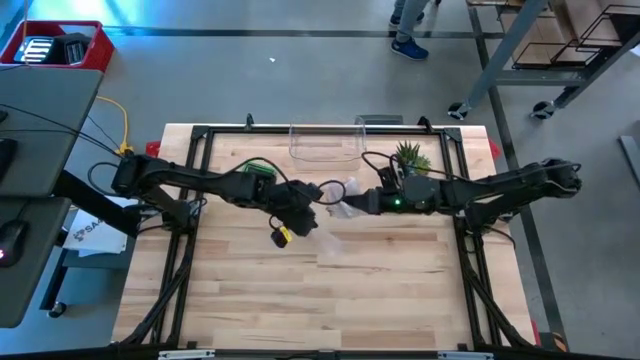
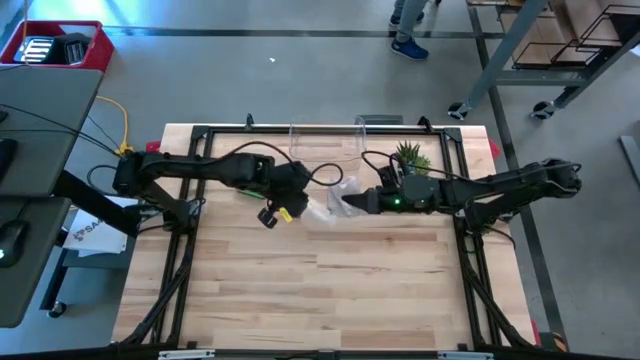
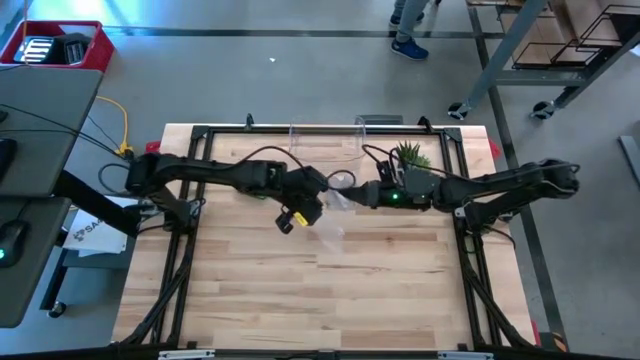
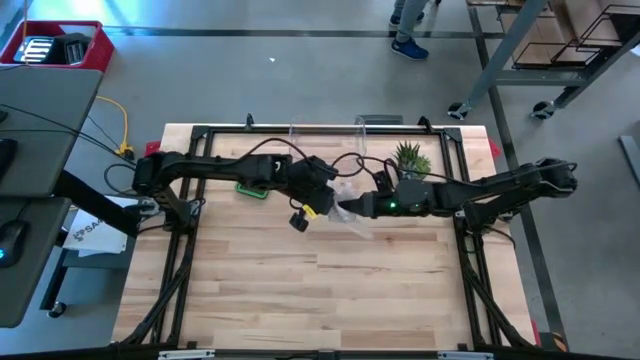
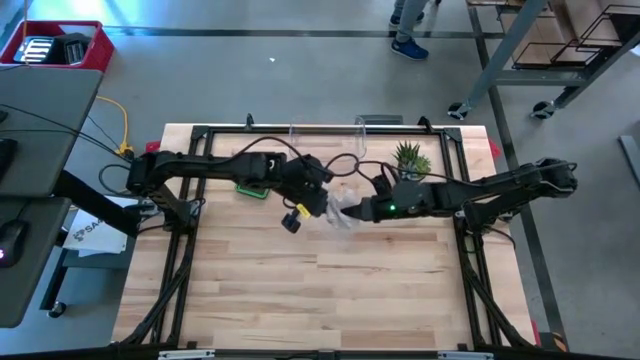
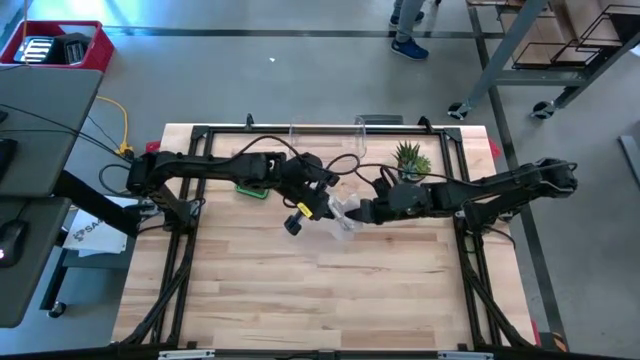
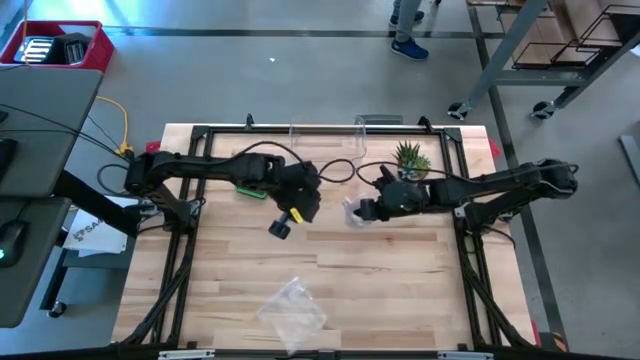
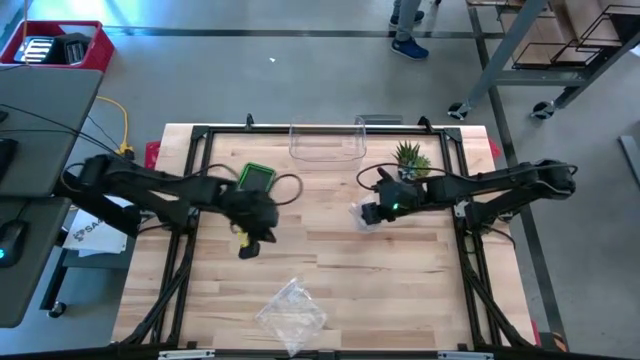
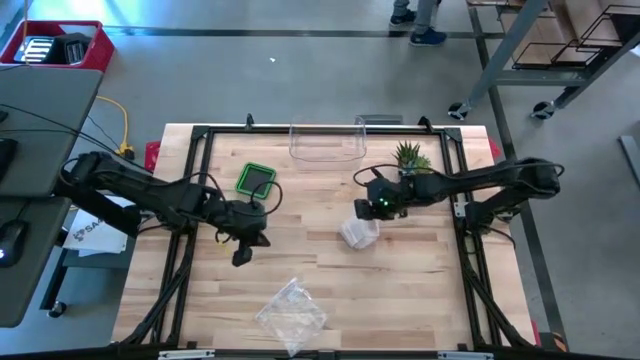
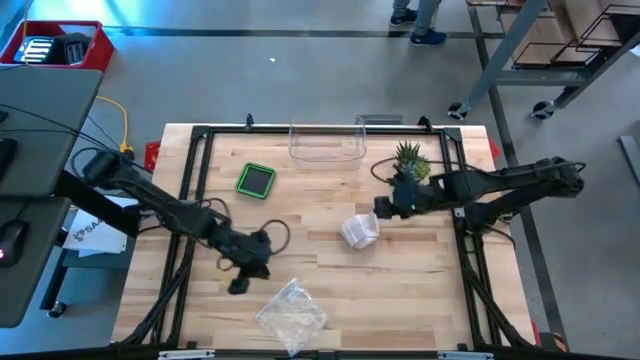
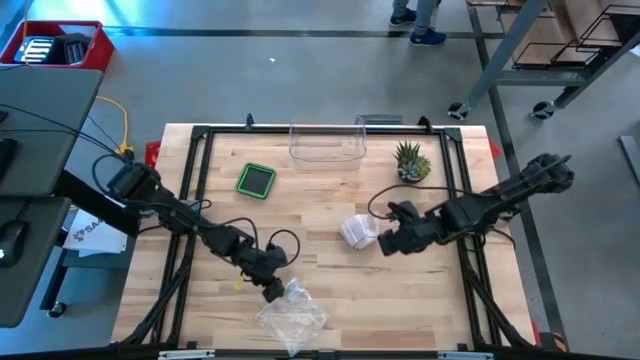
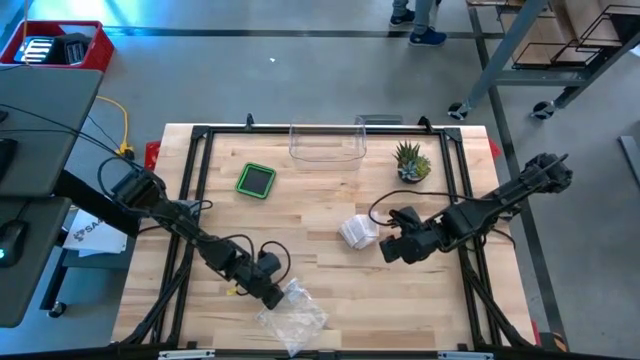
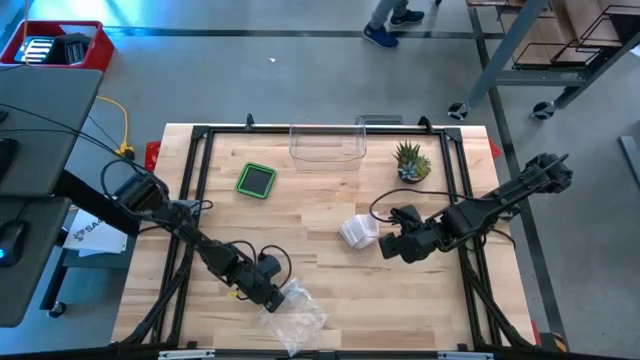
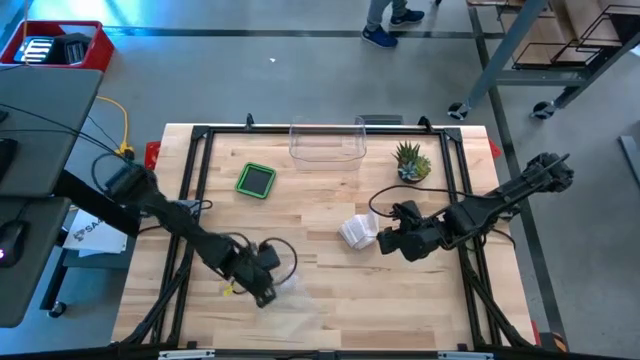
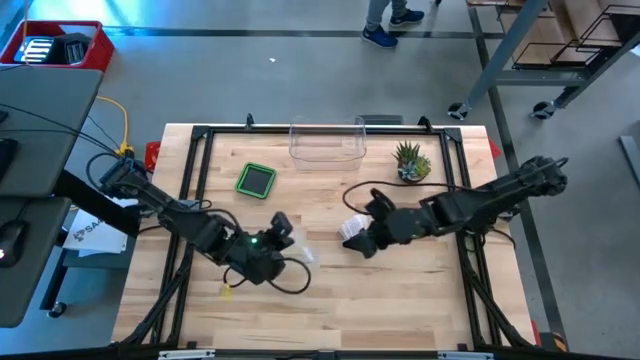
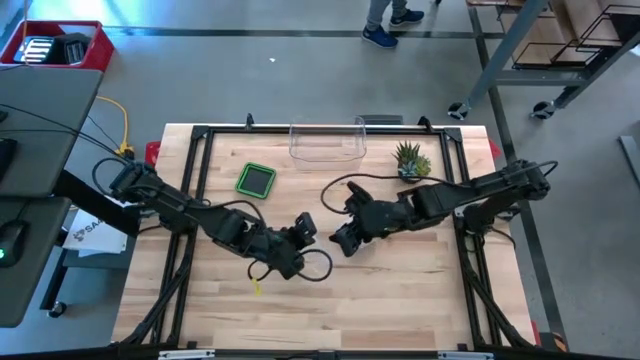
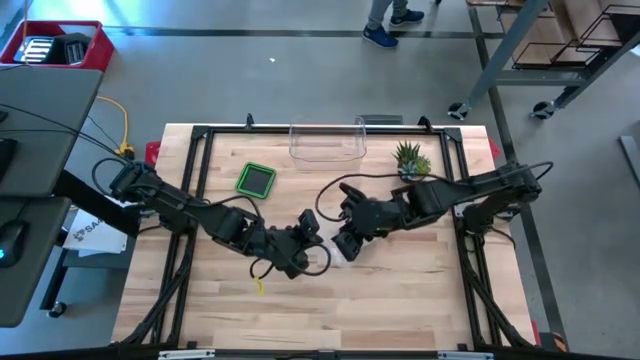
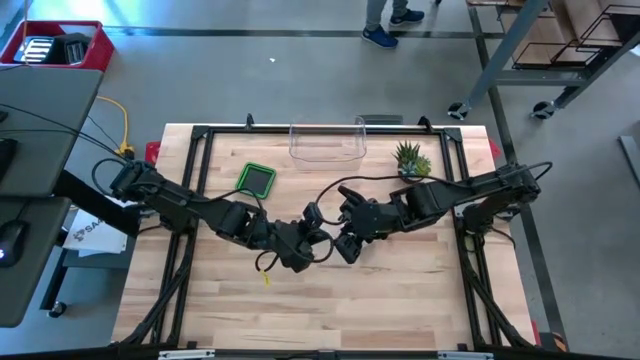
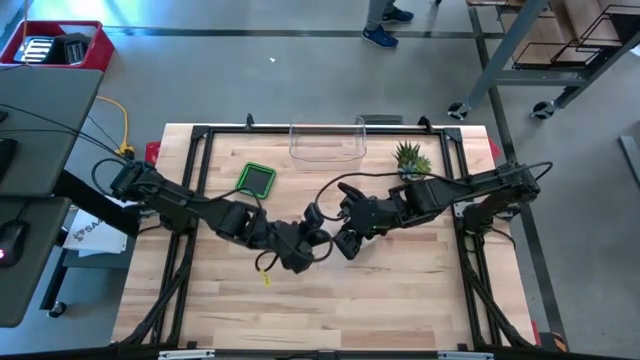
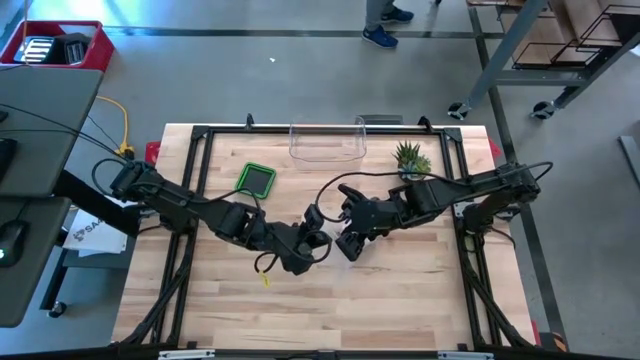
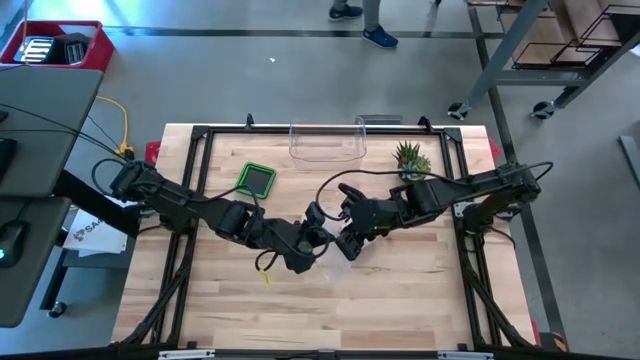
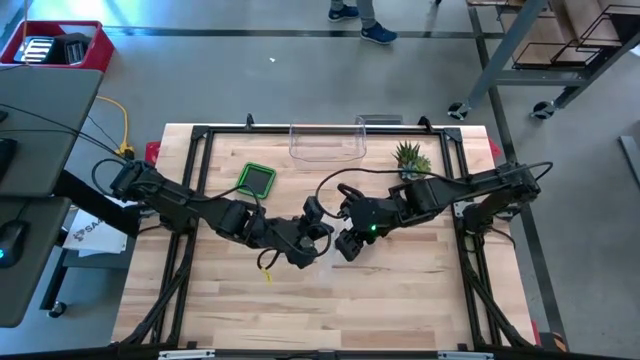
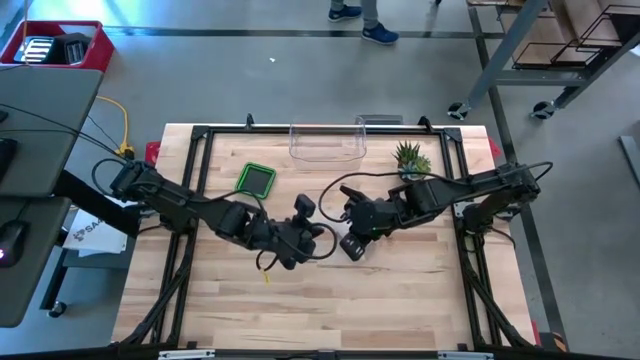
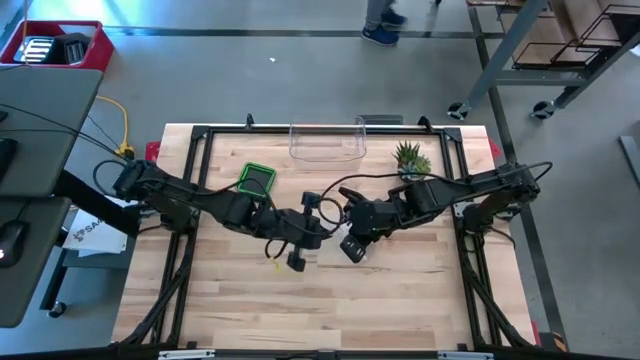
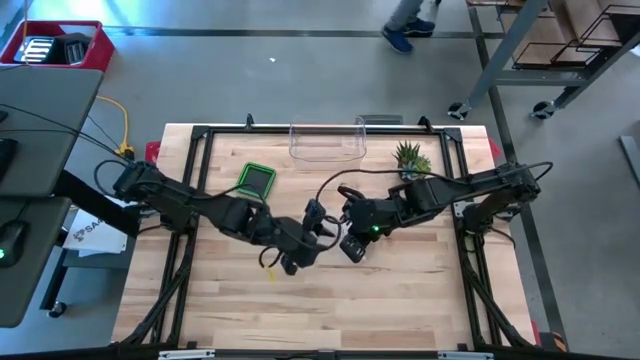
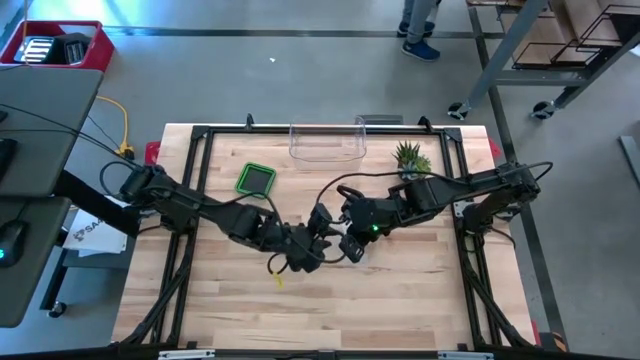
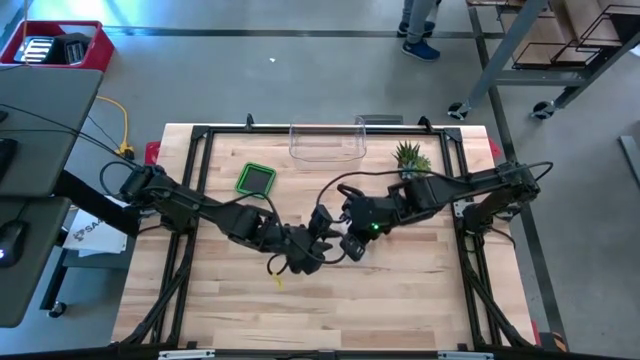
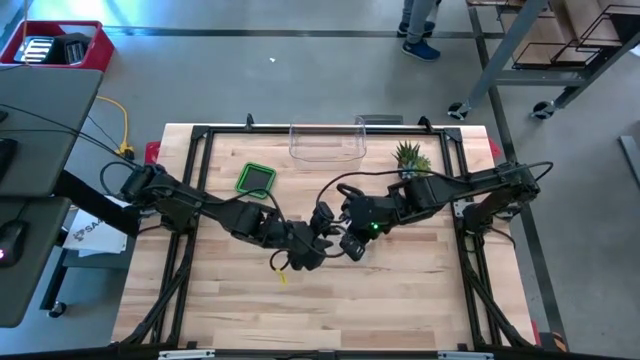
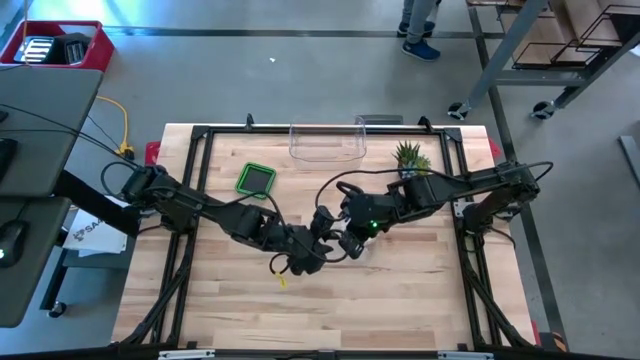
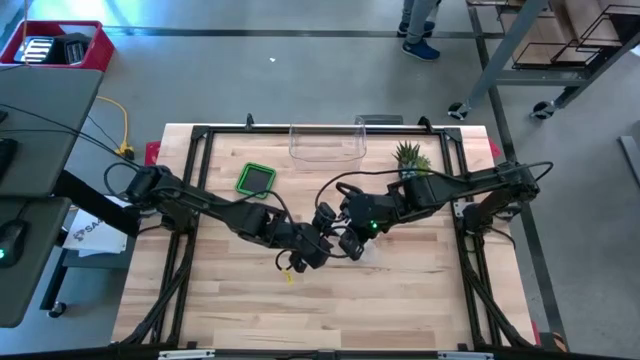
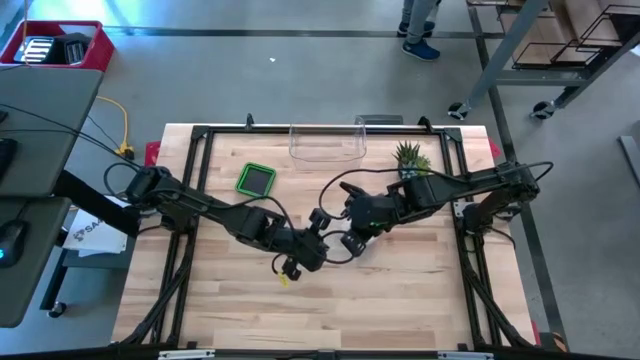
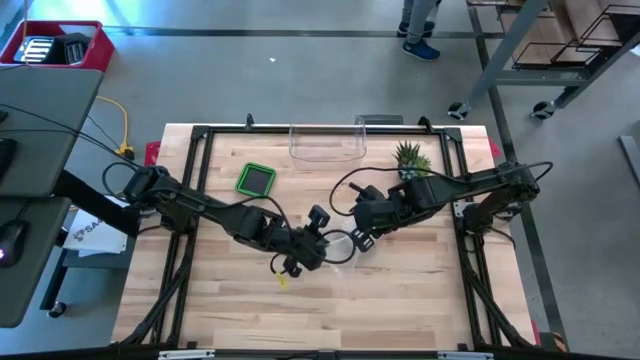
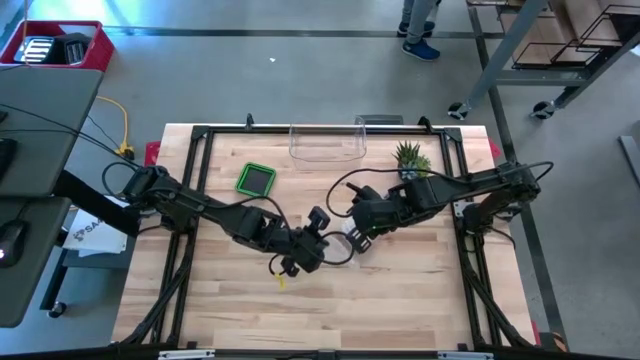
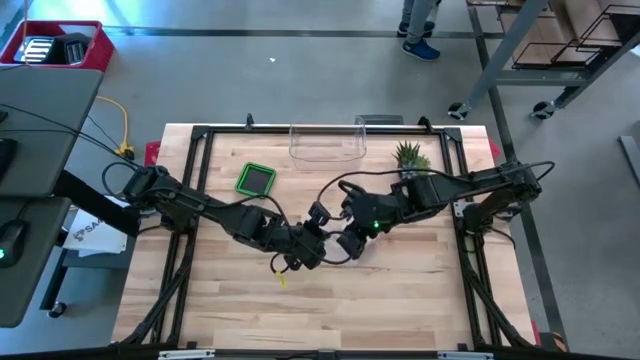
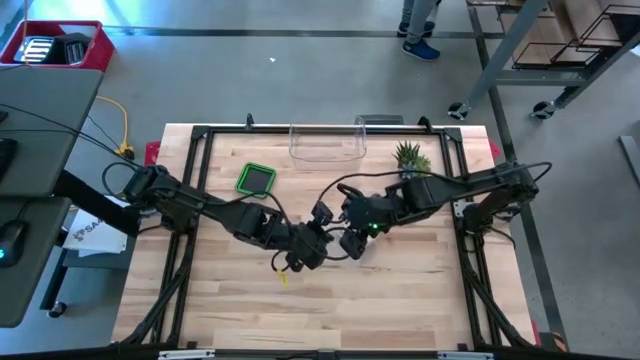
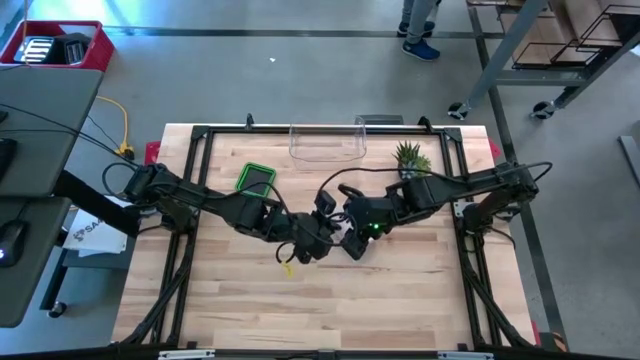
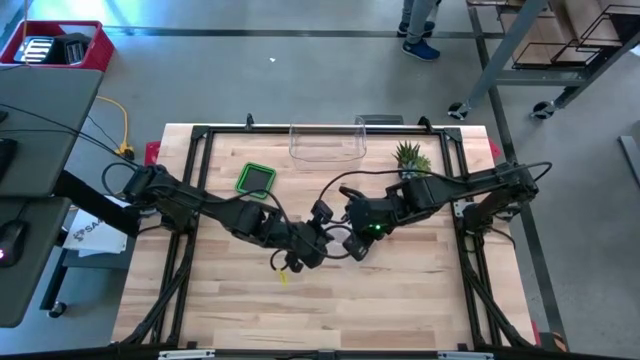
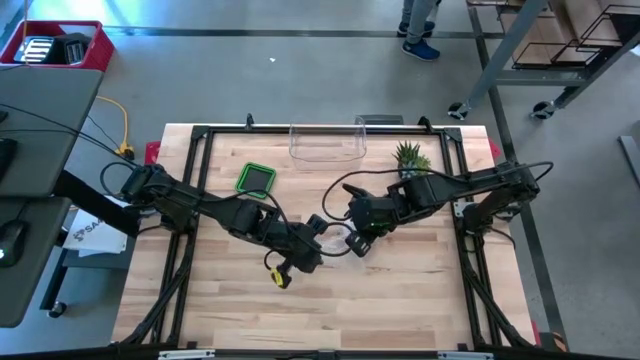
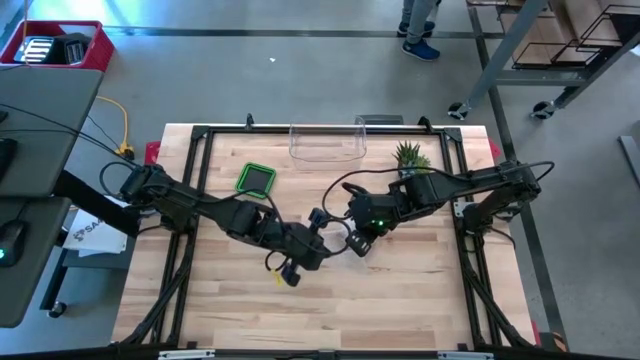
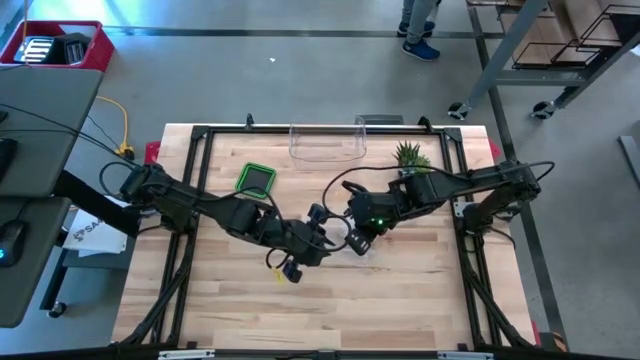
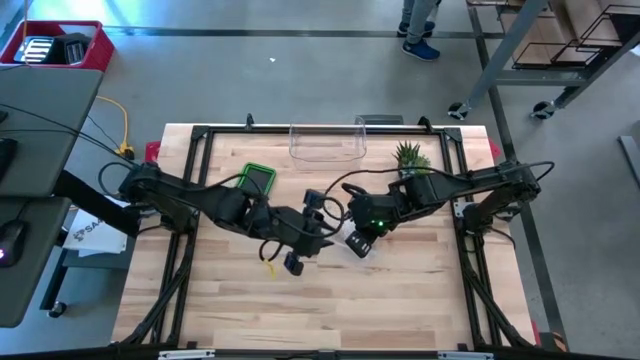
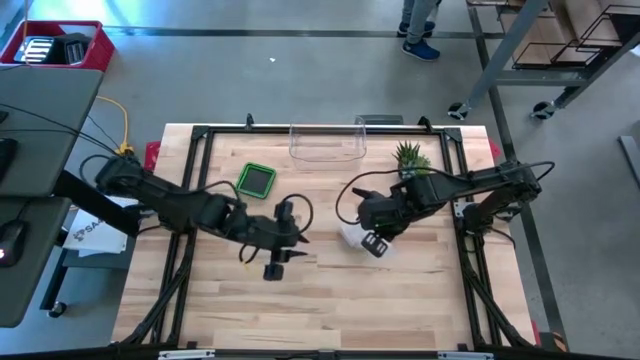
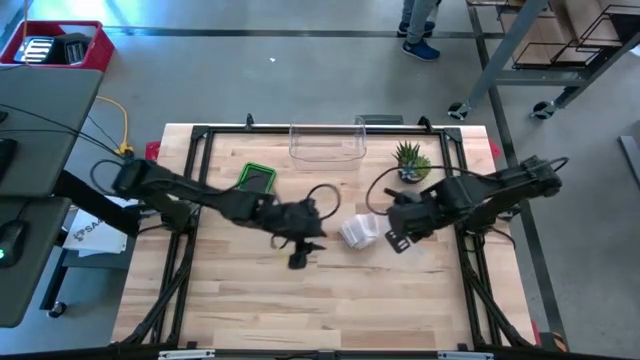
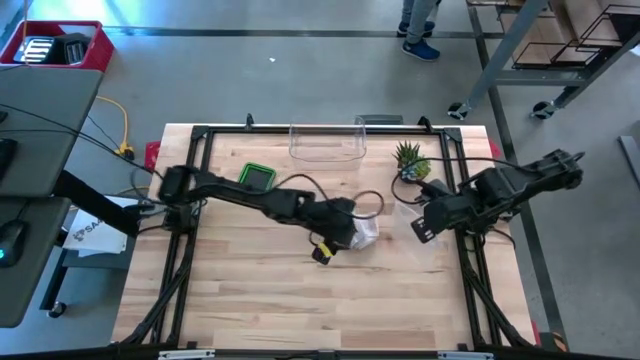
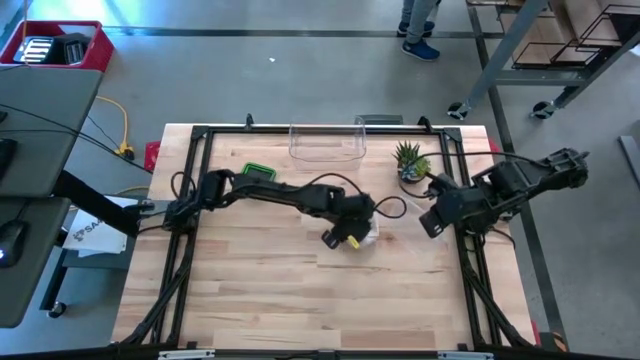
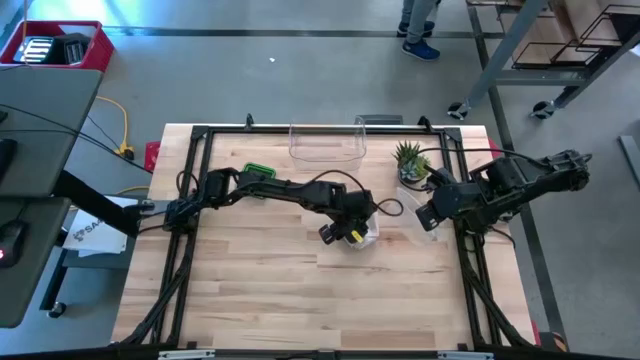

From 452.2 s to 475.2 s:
Task: Roll bandage
Put the rolled bandage into the transparent zip bag
